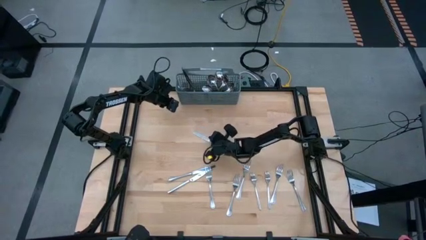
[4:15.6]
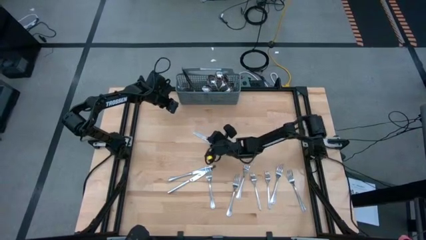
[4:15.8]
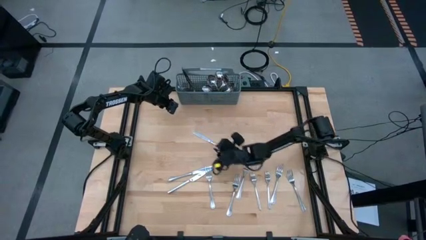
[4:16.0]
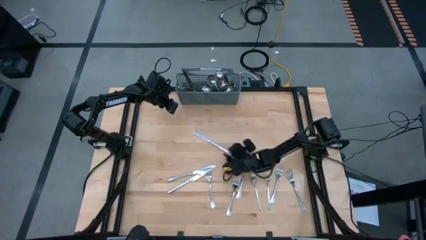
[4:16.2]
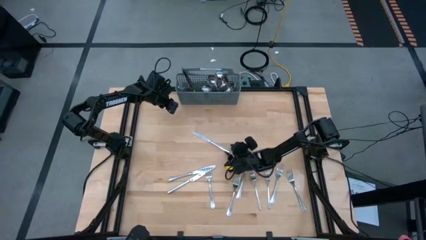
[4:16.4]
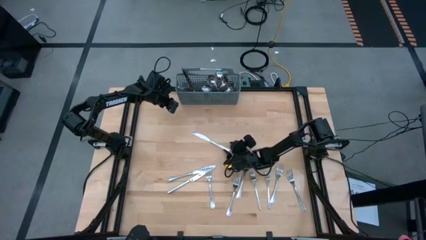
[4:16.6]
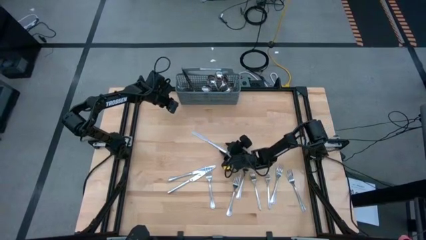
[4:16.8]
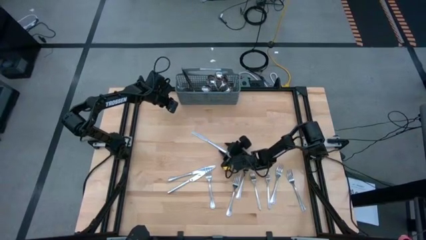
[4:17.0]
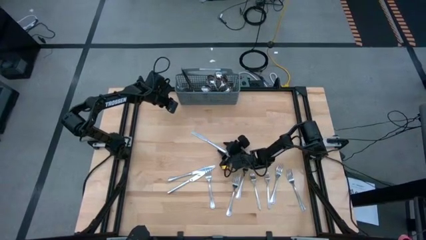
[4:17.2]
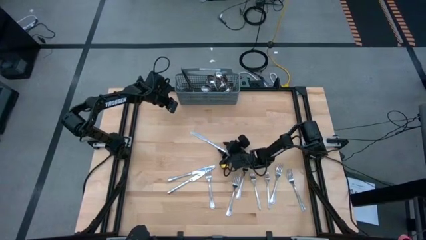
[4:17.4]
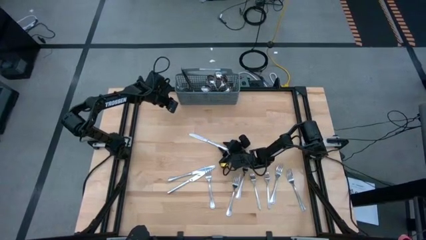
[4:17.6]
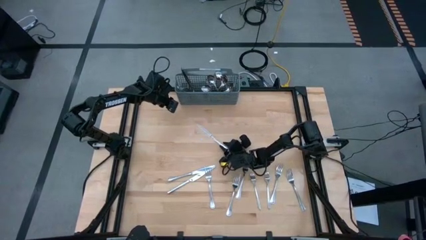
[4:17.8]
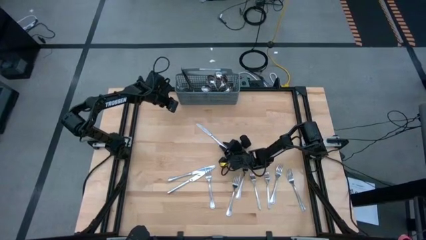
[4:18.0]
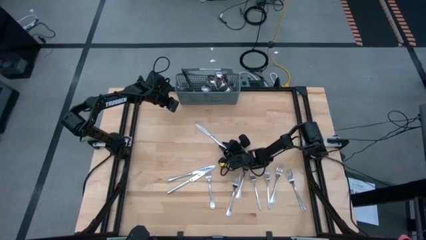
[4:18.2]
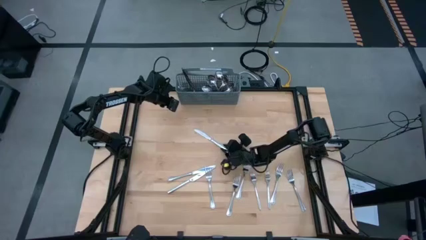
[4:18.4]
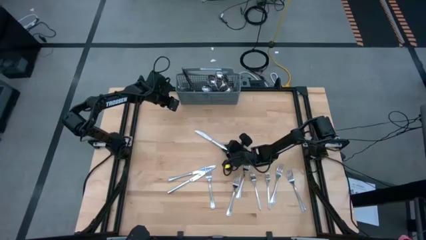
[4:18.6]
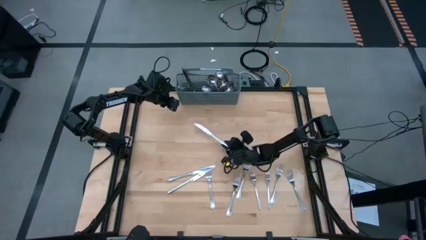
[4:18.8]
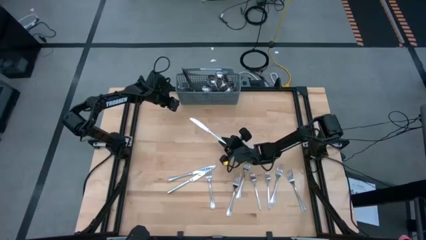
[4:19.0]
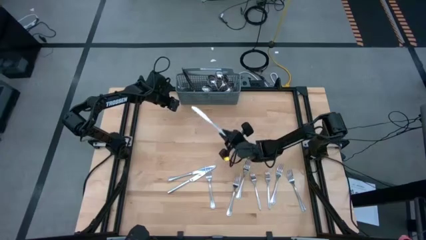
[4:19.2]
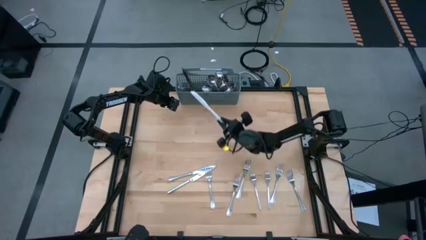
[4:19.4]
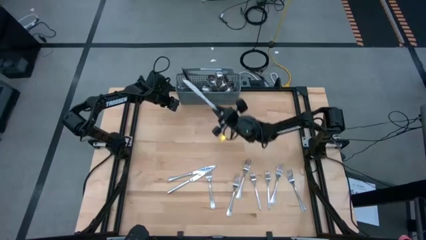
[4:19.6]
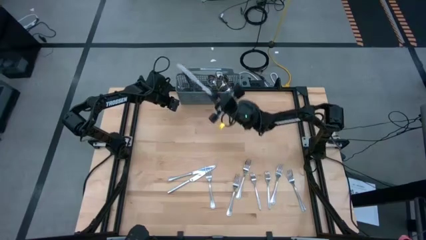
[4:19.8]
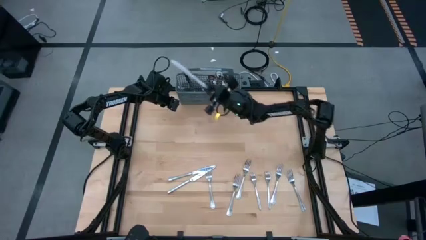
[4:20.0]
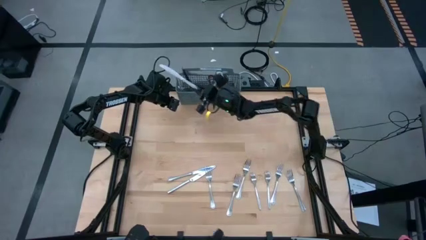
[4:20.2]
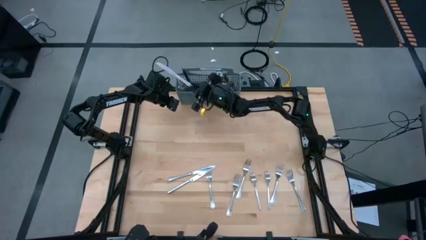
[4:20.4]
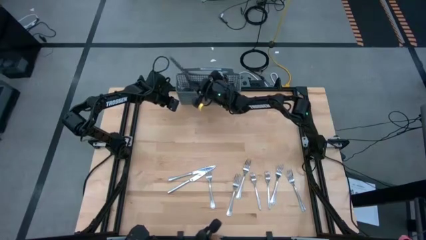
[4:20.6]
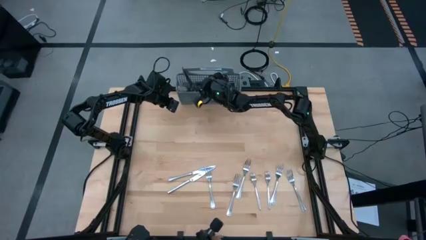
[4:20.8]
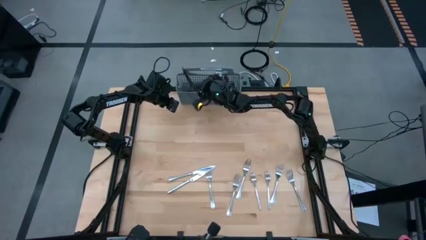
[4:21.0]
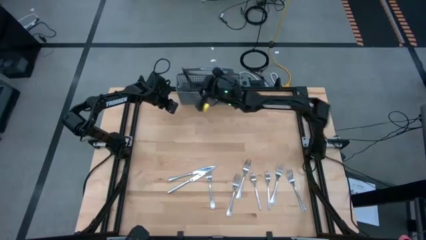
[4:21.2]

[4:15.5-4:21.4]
Task: Sort silverware
Put the silver knife into the gray utensil holder

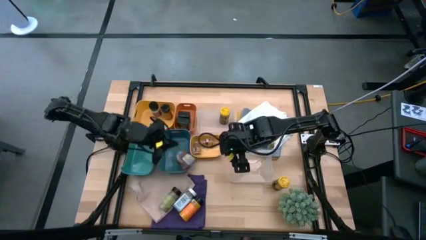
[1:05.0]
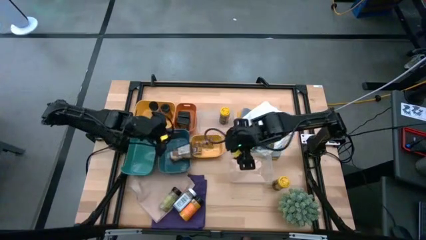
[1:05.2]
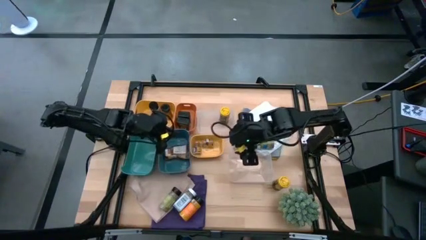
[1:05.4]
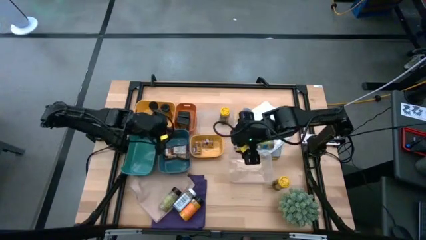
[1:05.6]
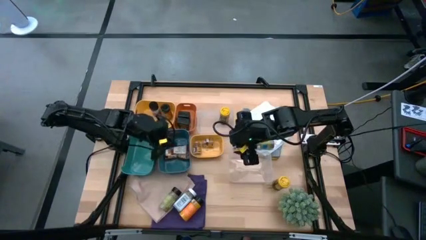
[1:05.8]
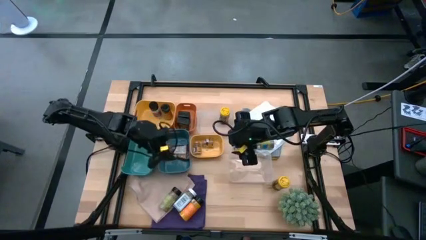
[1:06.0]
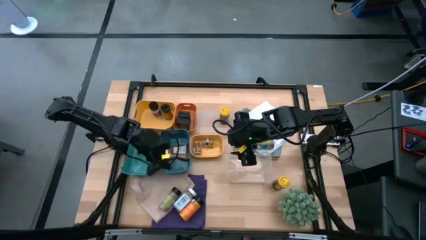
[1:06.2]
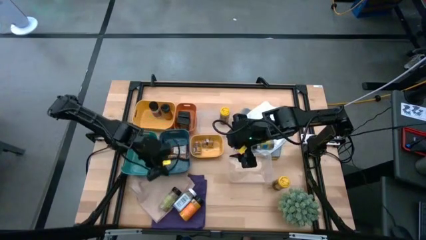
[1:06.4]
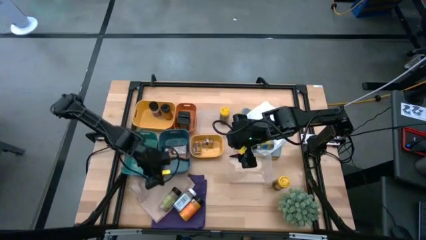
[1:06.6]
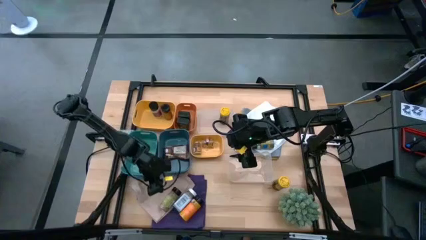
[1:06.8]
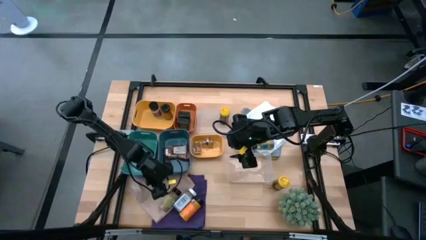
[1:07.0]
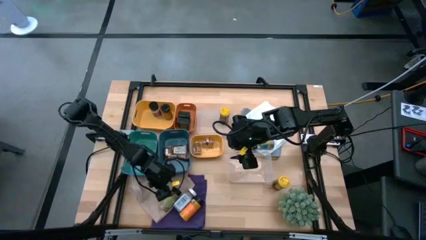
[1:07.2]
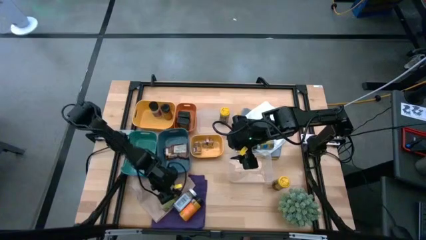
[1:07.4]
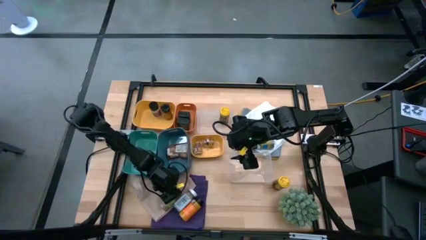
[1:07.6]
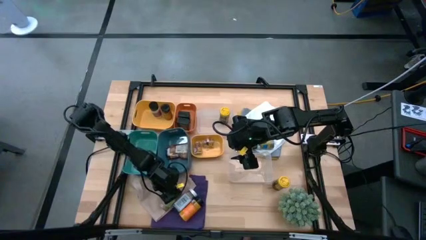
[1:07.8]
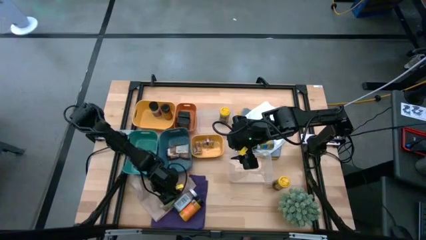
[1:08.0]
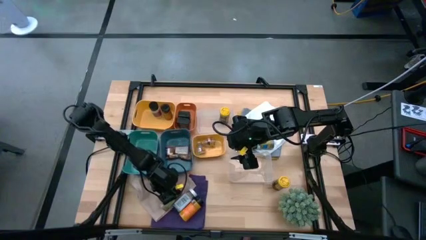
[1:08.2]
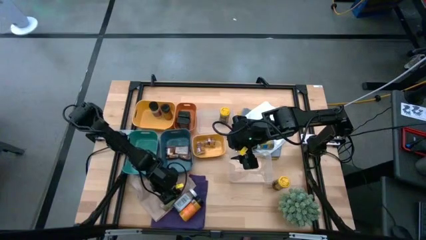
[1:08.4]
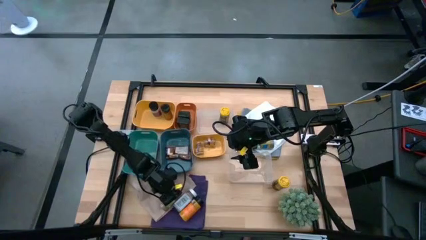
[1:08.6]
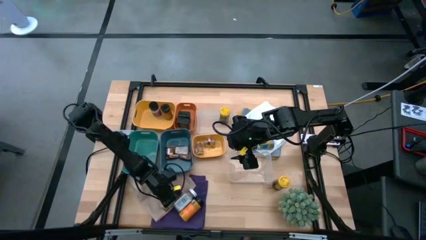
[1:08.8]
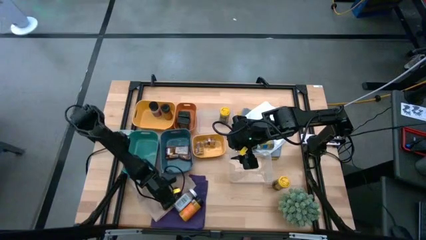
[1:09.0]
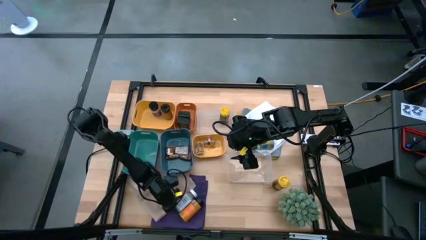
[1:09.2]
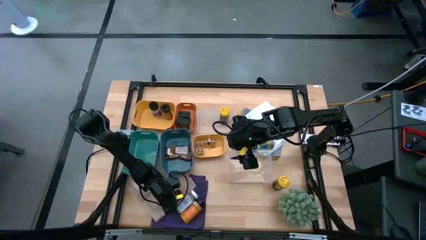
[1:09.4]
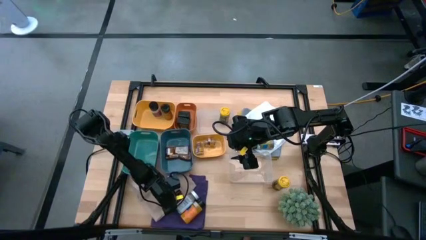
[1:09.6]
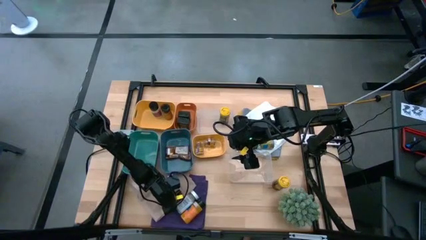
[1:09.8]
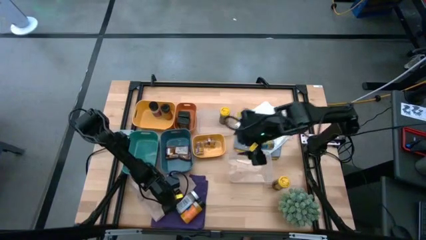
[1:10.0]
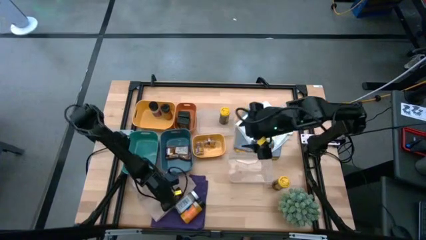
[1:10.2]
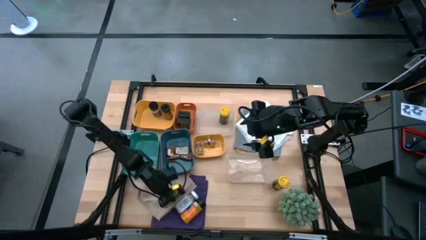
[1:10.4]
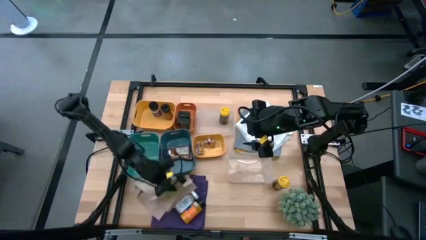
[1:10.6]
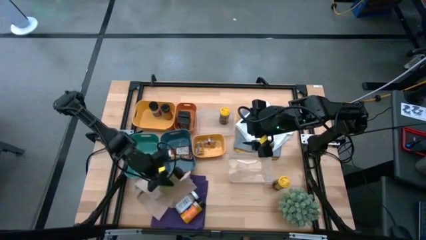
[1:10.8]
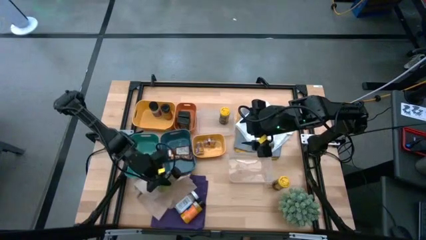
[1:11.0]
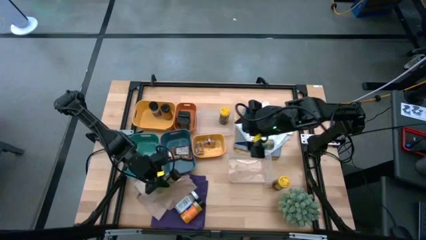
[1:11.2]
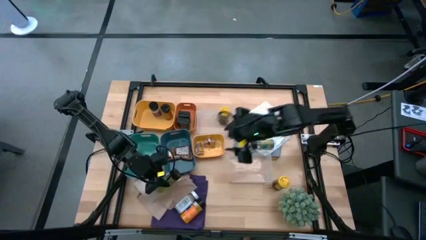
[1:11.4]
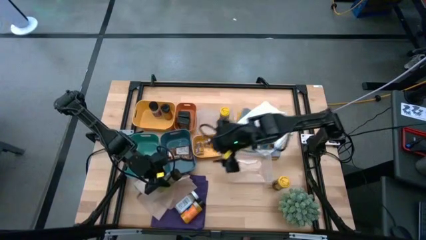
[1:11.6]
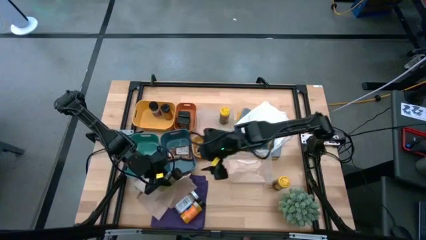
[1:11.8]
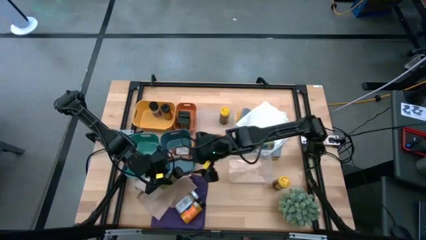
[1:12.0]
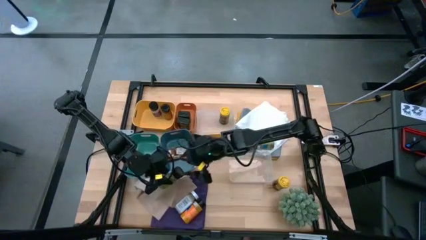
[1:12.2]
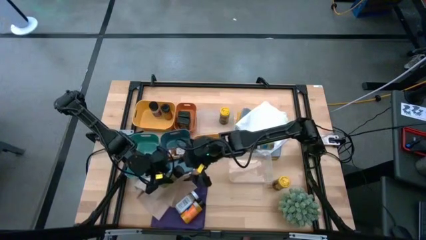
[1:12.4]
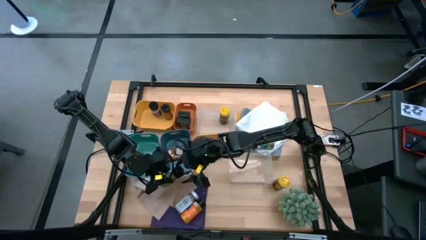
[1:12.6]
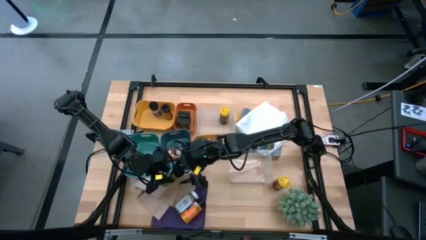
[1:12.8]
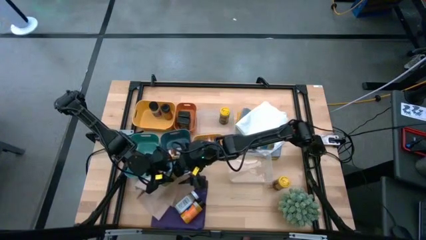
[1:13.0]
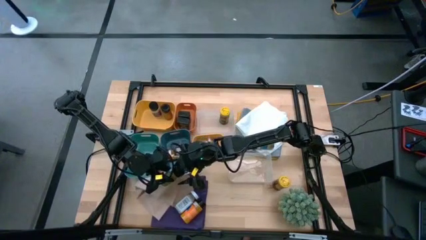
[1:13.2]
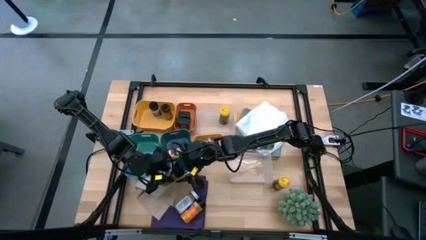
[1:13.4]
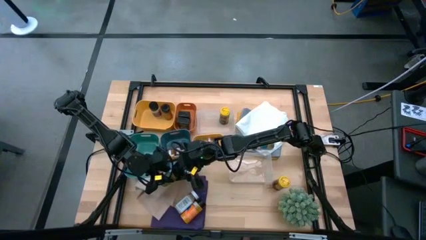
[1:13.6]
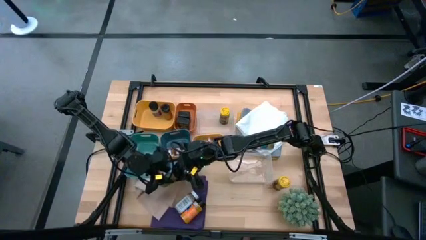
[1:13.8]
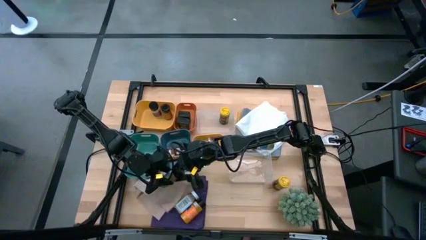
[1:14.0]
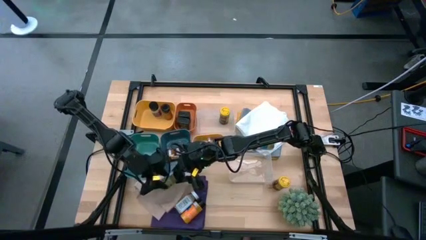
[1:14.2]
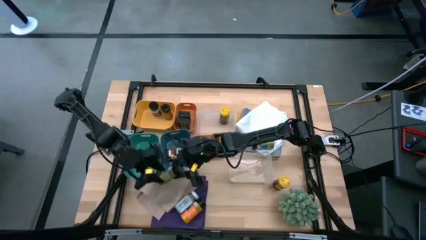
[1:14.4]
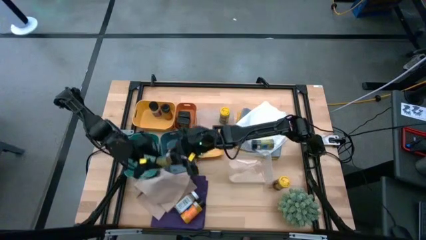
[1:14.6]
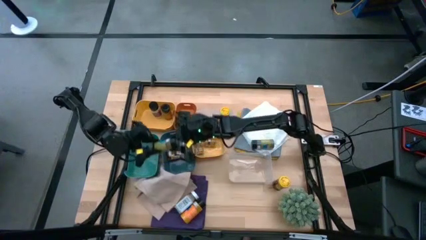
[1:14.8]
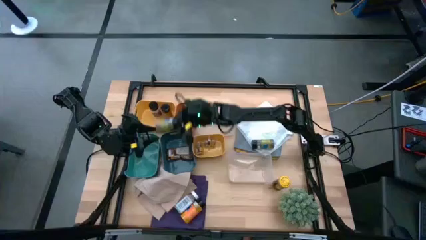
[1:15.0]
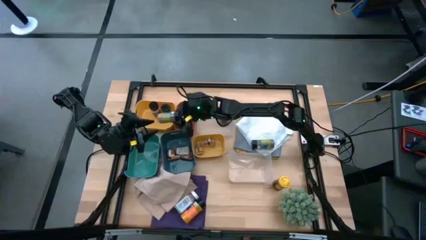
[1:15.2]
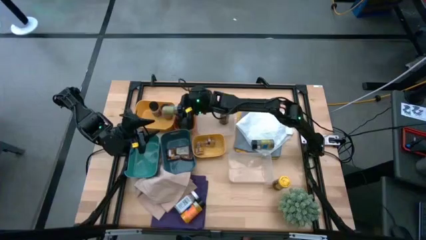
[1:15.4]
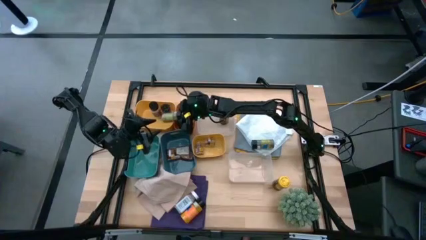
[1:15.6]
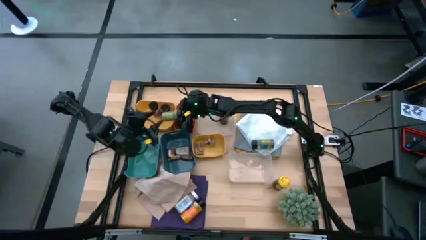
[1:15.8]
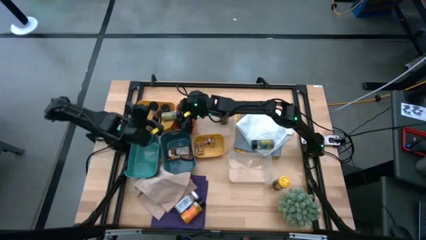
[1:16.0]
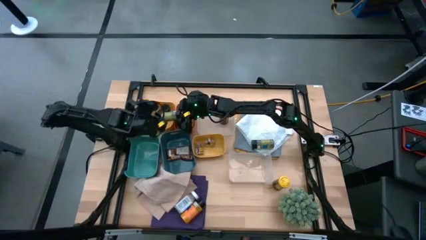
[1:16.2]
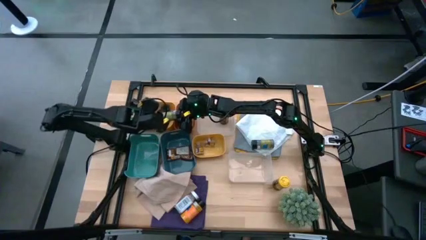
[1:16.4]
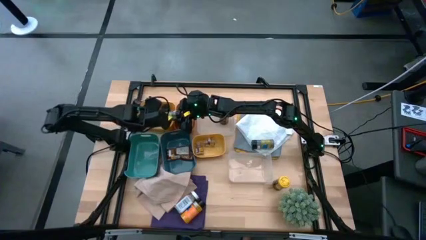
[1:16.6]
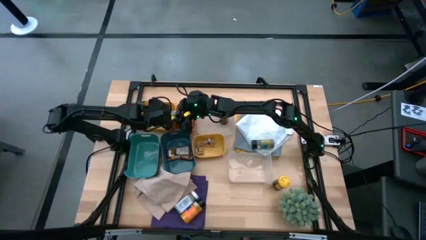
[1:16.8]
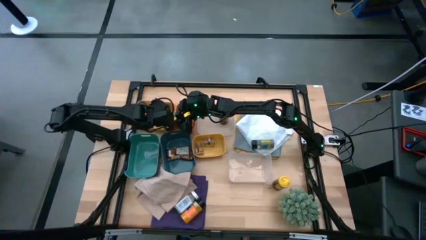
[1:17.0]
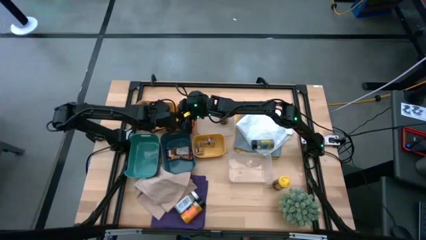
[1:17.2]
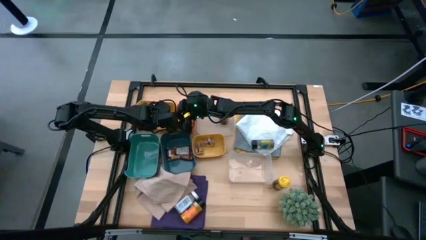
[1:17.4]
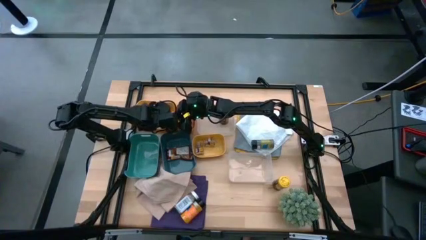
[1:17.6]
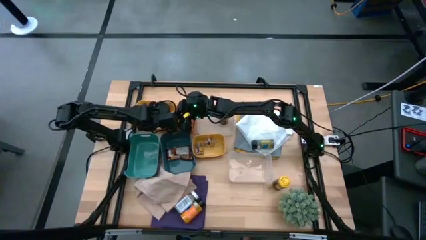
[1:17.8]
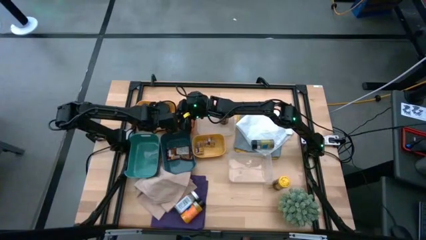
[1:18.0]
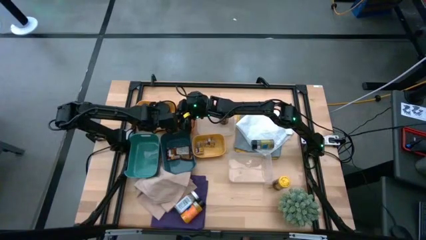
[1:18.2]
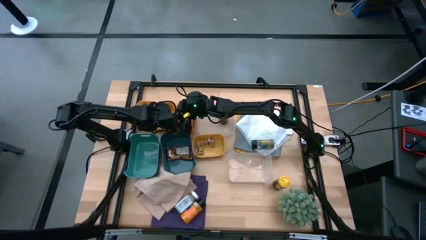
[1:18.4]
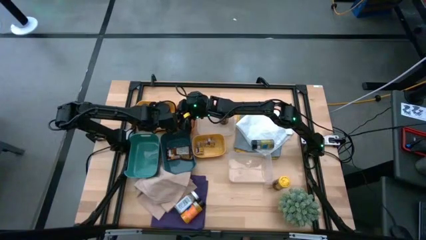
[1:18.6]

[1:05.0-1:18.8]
Task: Sort spices by type
Put the bottom green spice bottle on the top yellow bin
